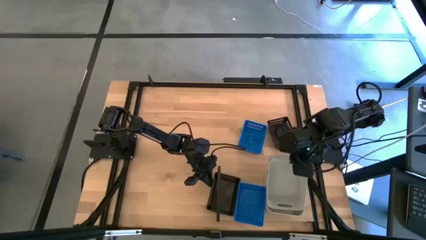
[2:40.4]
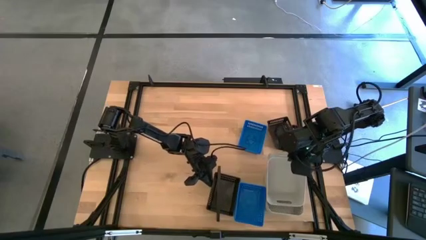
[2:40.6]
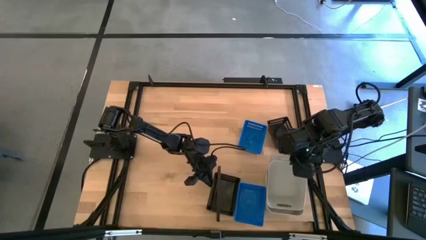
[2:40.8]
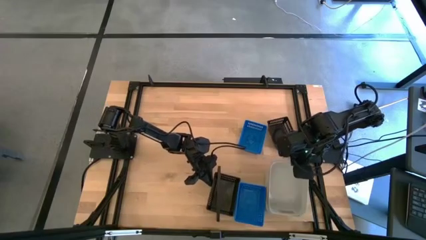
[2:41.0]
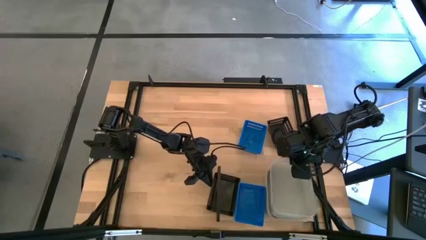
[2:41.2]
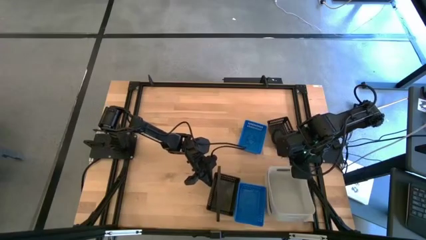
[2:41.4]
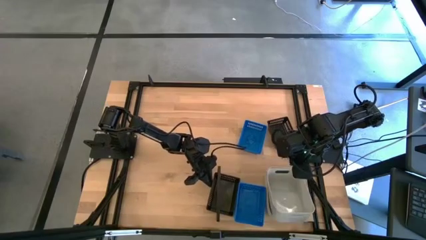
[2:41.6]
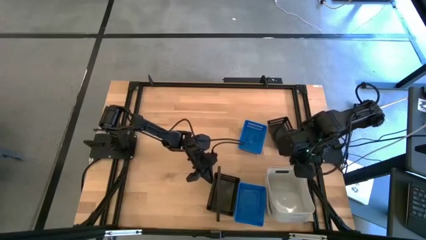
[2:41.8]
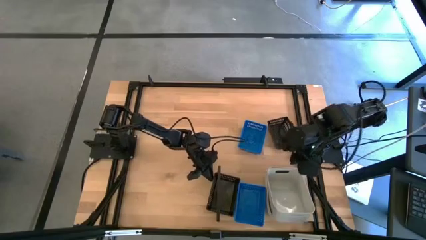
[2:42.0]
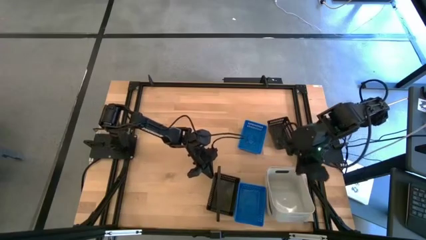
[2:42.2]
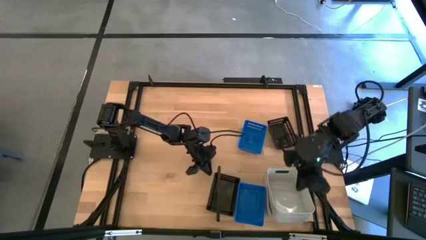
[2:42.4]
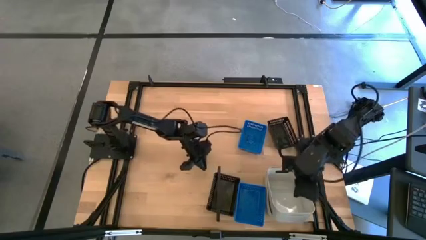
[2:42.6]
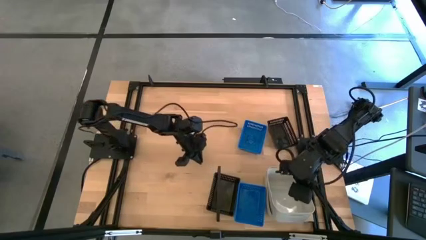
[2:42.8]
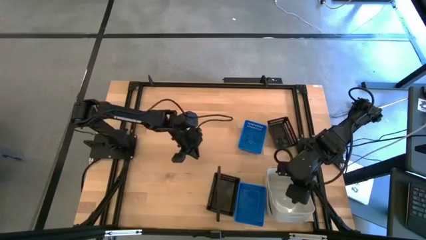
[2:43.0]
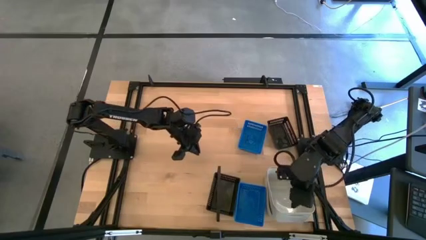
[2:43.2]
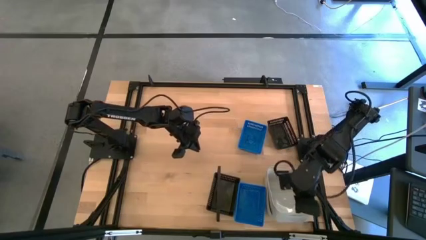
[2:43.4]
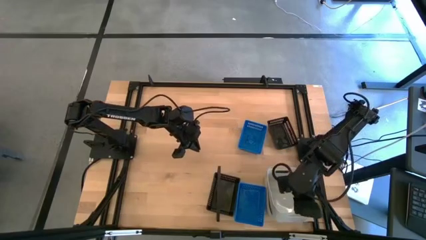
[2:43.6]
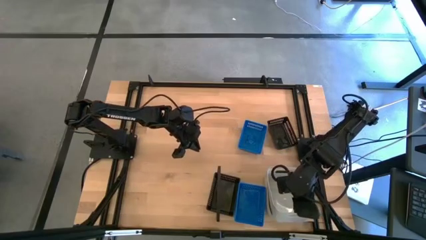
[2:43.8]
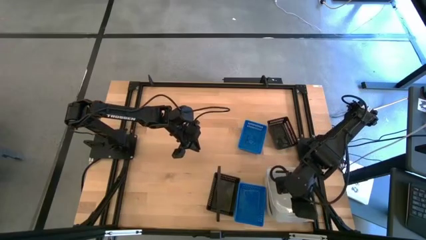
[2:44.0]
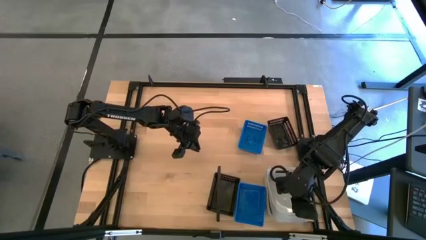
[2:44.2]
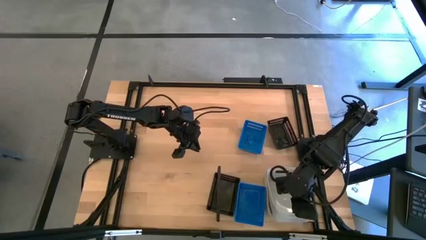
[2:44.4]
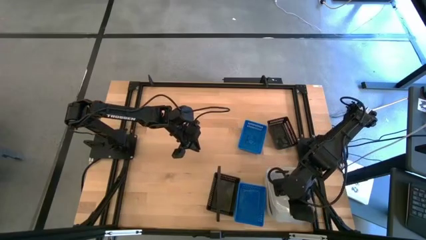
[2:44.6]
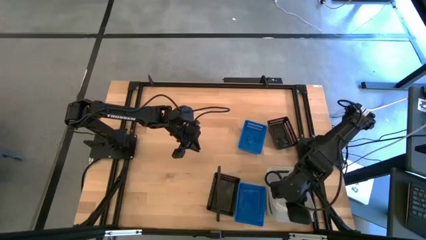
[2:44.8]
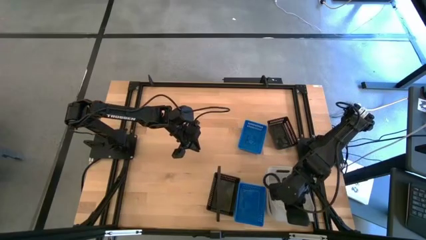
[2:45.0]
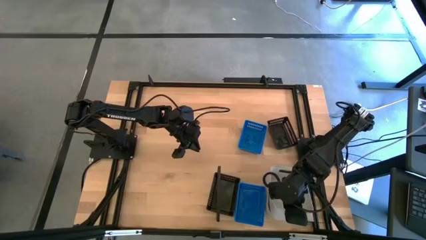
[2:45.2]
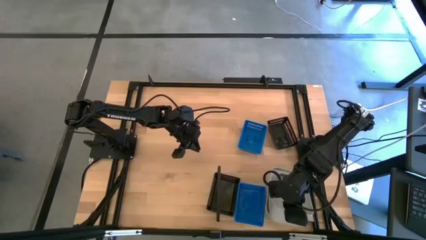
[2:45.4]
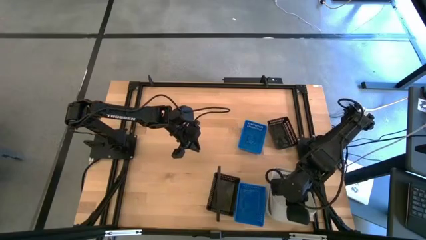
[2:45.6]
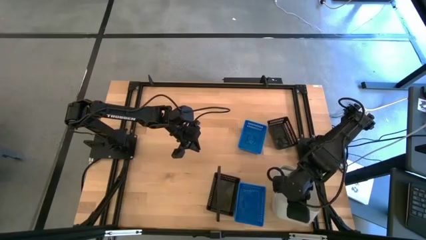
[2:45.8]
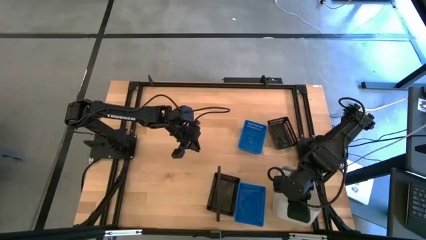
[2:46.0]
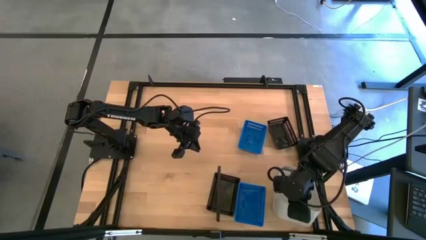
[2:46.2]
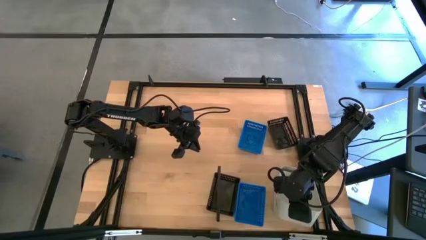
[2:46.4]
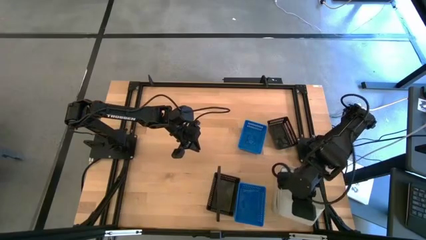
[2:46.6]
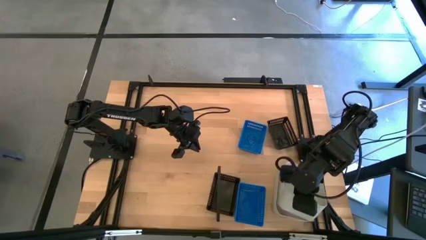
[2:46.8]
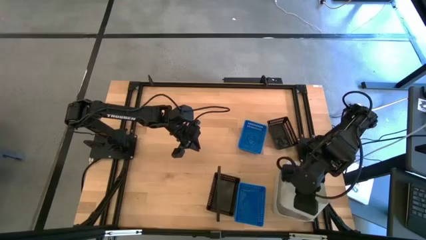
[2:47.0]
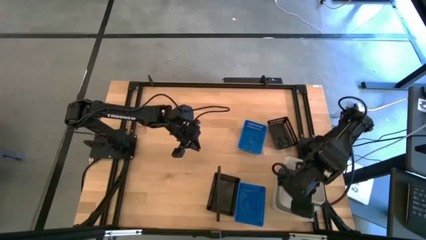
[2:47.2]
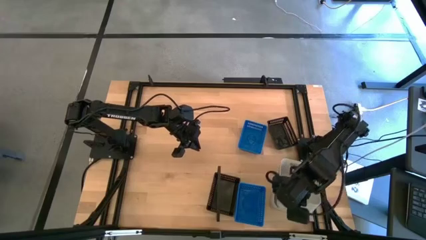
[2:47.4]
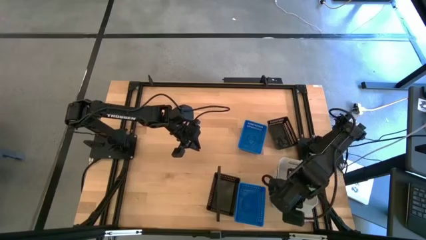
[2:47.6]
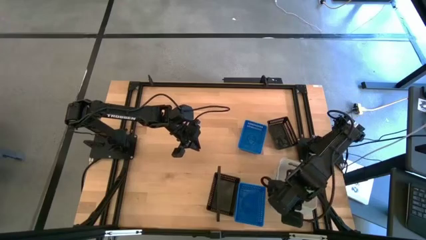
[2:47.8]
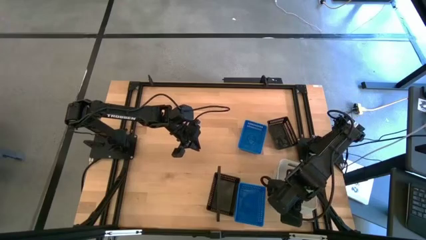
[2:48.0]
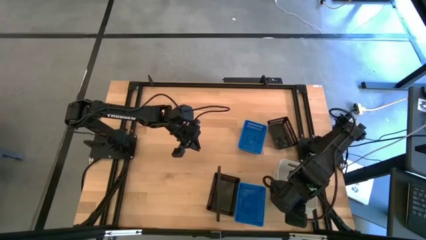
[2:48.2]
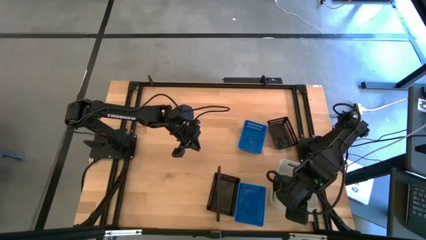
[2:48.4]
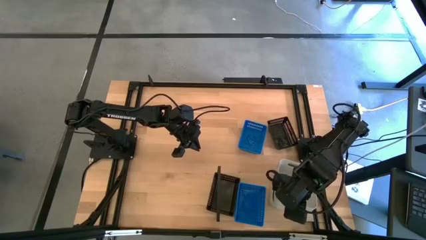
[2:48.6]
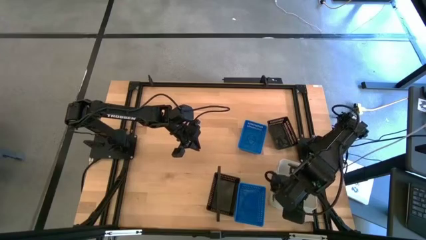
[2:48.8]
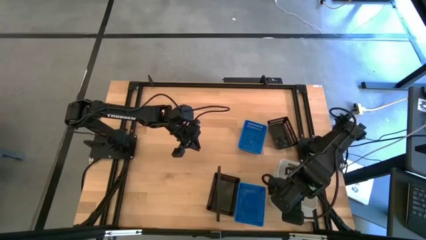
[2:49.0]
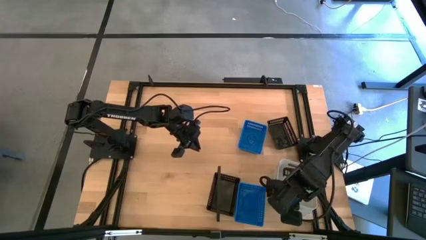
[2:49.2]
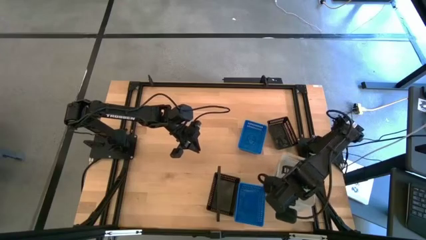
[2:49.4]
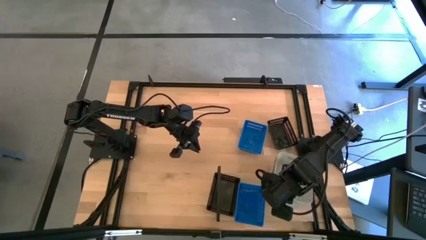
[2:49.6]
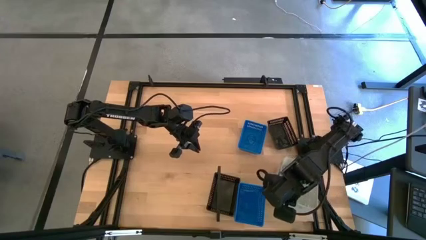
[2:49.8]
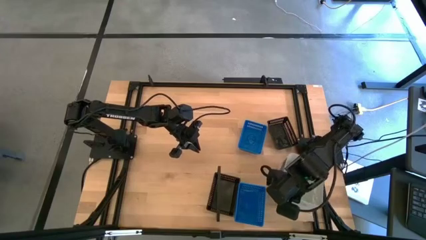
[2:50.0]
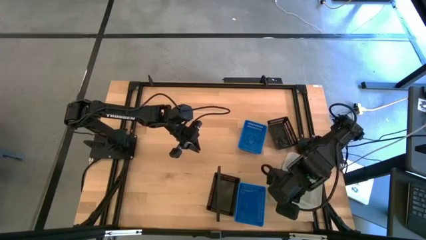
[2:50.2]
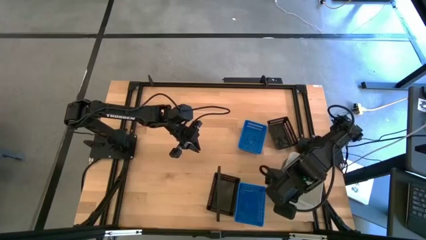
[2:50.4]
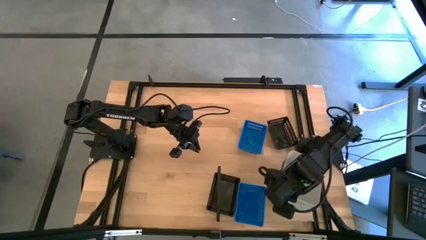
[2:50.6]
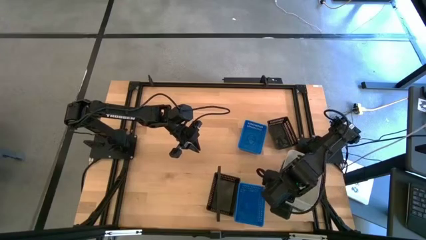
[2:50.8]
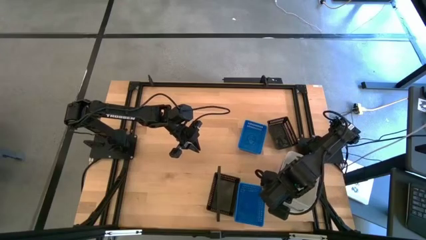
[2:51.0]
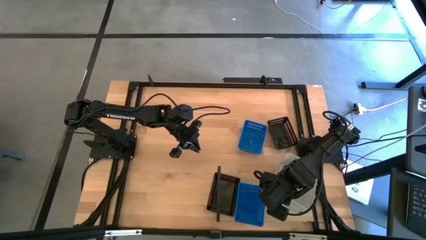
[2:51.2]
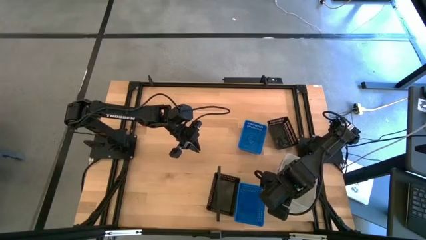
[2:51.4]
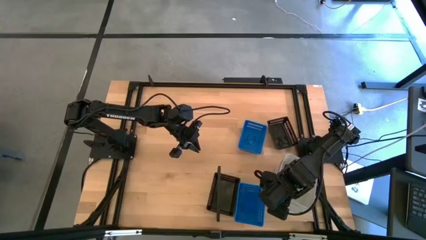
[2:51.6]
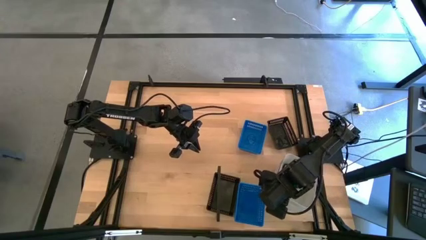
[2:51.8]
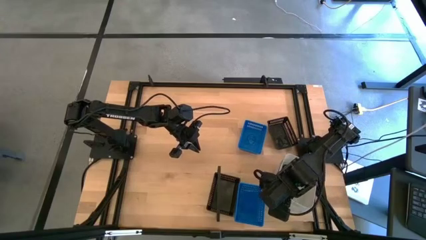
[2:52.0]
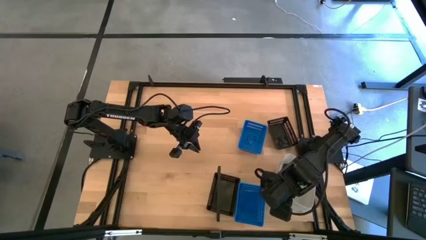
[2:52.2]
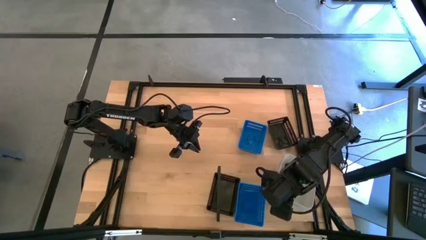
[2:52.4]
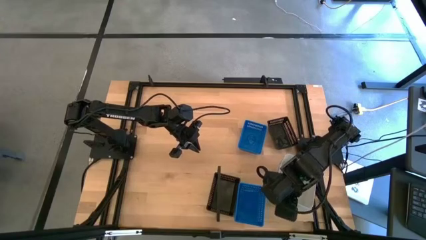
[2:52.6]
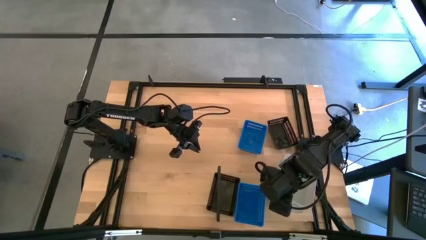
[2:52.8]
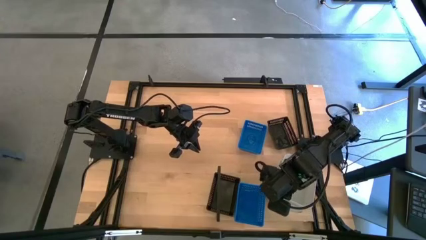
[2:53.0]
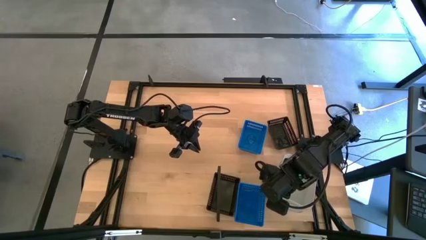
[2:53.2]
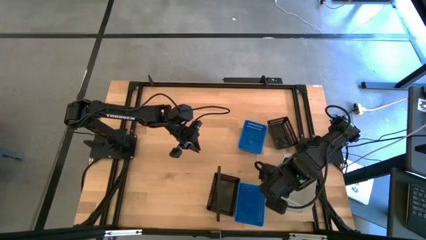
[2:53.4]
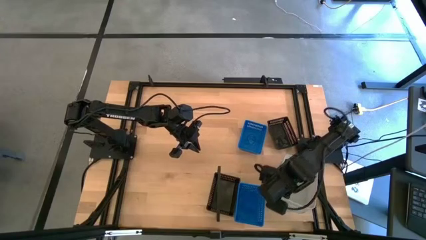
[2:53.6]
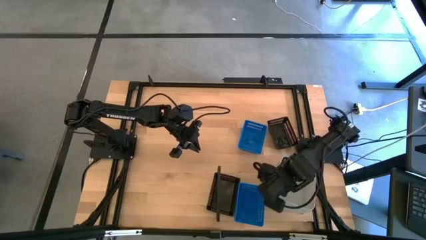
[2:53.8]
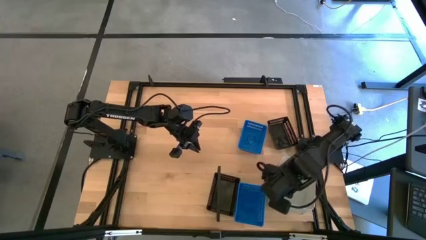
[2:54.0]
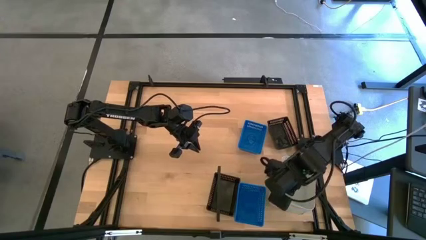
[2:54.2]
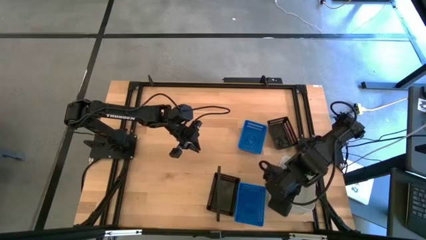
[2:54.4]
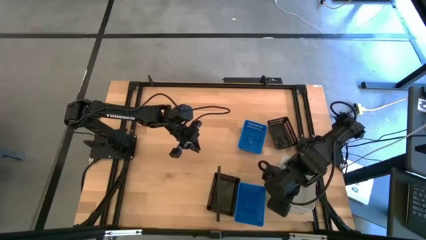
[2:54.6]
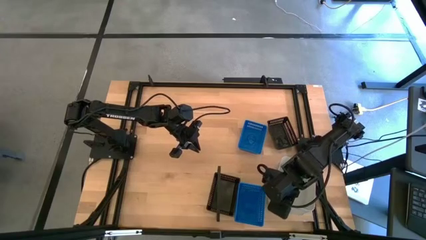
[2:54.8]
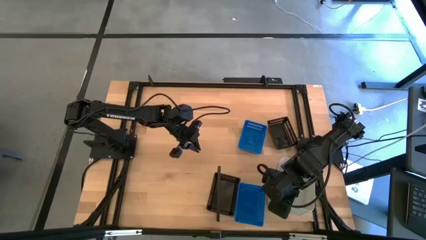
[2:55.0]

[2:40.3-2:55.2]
Task: Stack baskets on shelf by color
Stack the gray bin on top of the gray bins on the shelf

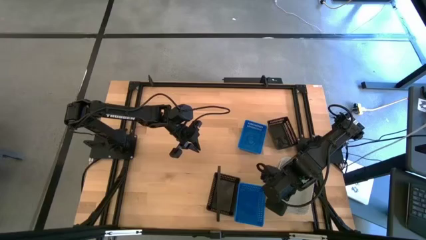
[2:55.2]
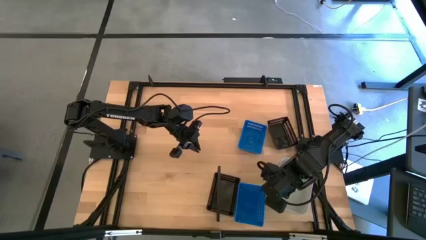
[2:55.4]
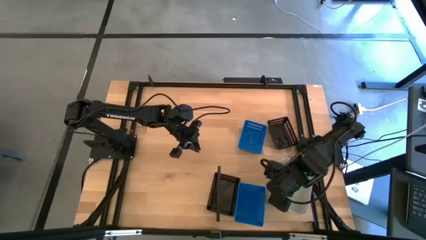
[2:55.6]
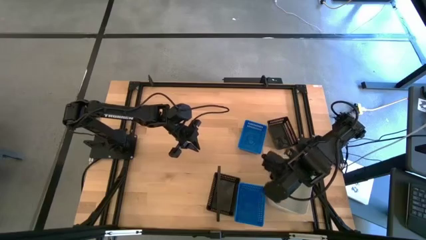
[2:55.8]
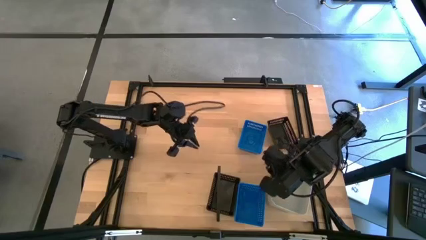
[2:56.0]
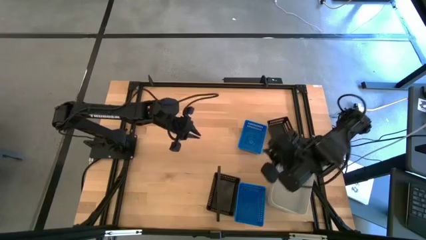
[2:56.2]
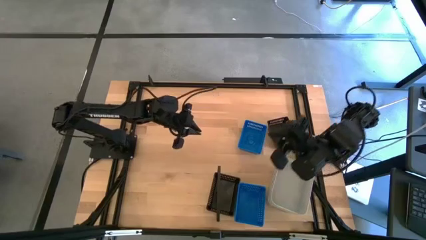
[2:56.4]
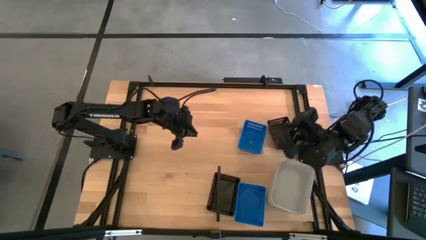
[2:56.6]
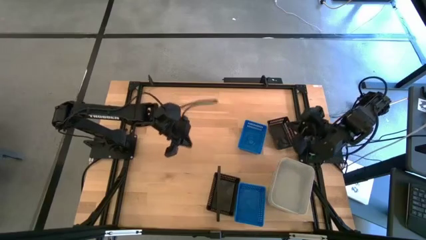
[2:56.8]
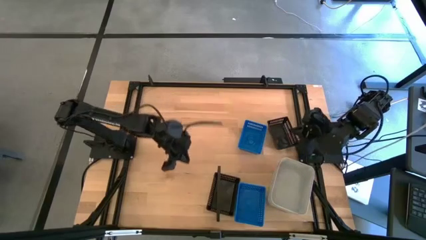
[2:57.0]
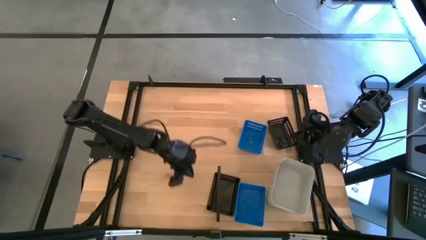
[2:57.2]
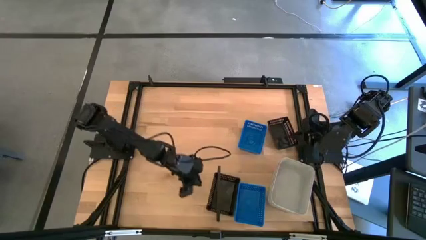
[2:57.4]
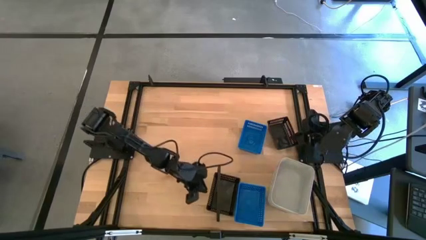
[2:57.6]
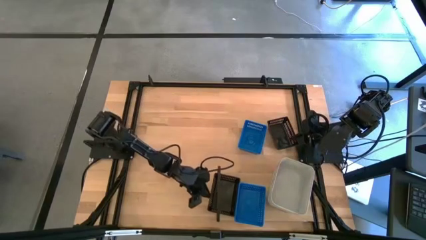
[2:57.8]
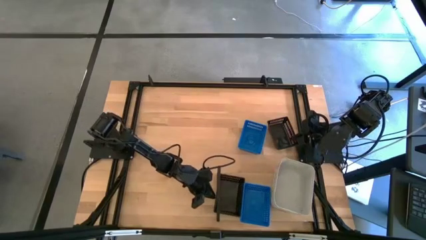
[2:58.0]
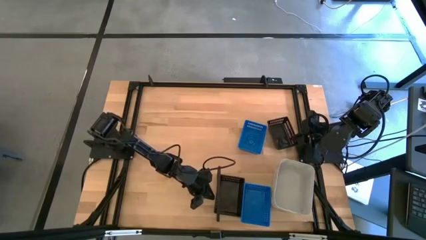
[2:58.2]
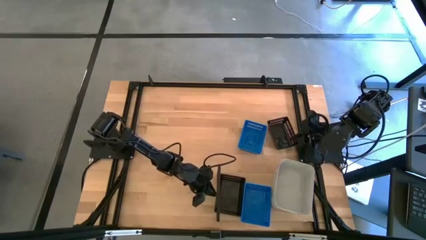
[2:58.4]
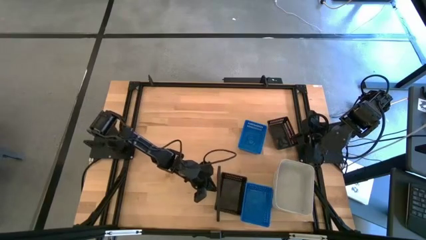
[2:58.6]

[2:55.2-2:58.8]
Adjust the black bin
